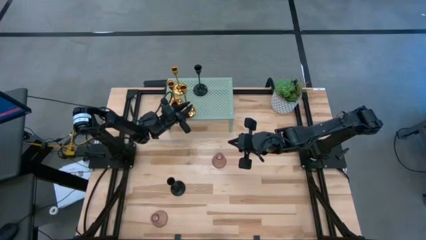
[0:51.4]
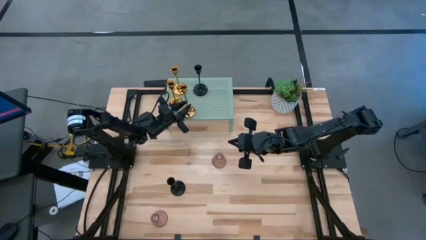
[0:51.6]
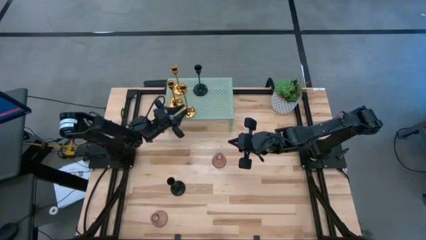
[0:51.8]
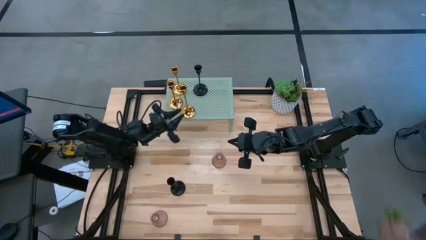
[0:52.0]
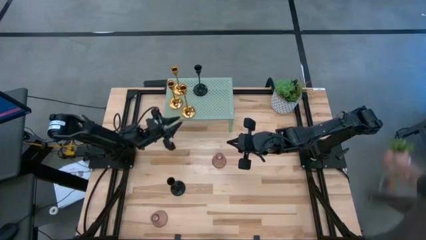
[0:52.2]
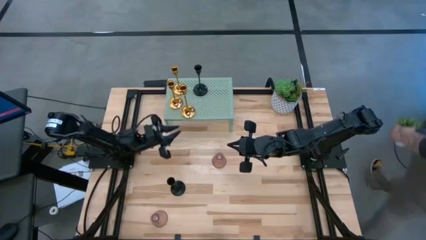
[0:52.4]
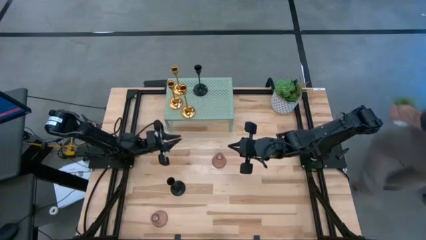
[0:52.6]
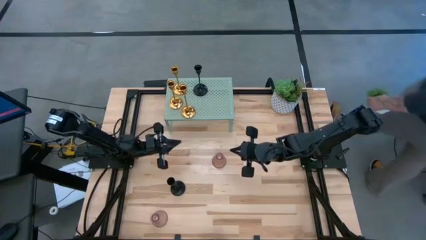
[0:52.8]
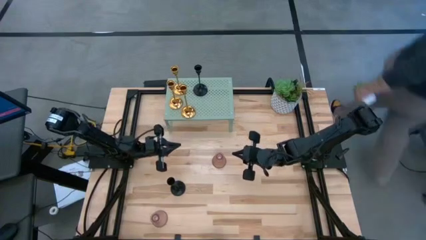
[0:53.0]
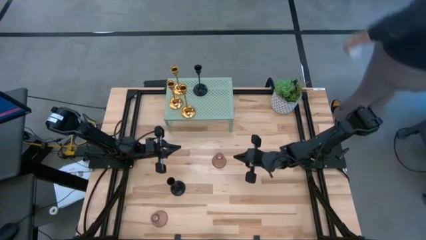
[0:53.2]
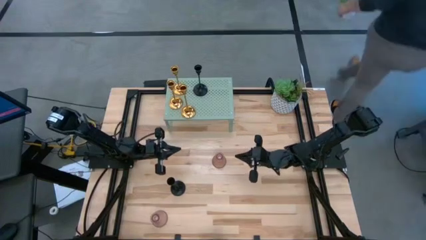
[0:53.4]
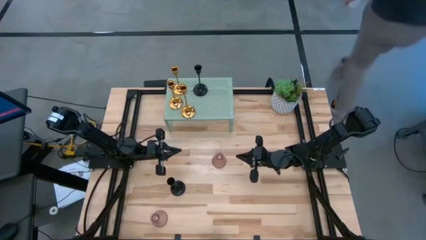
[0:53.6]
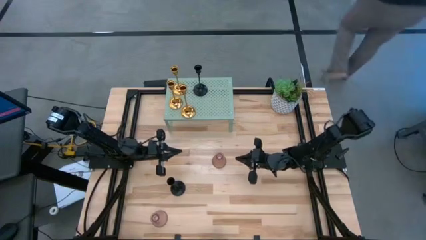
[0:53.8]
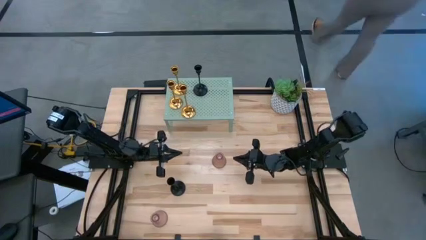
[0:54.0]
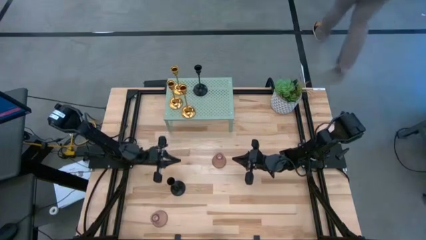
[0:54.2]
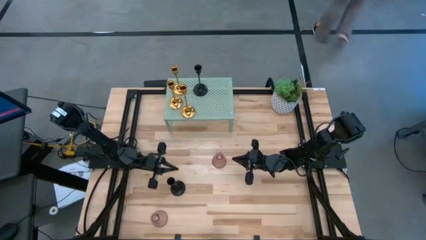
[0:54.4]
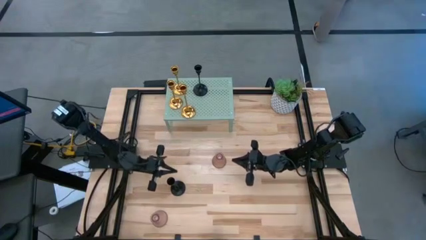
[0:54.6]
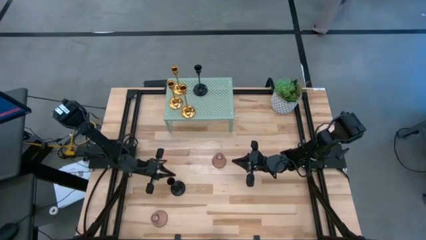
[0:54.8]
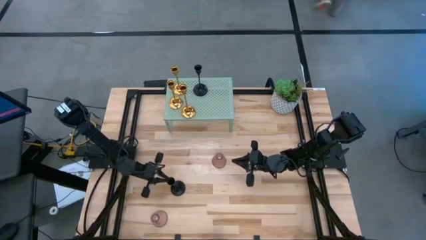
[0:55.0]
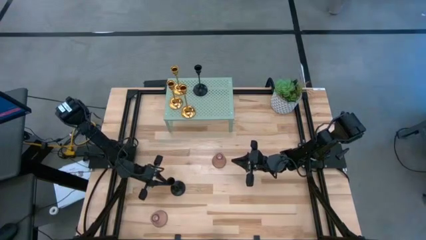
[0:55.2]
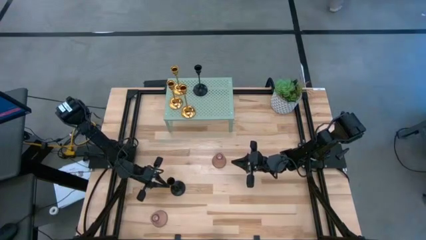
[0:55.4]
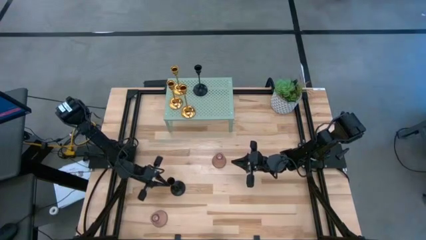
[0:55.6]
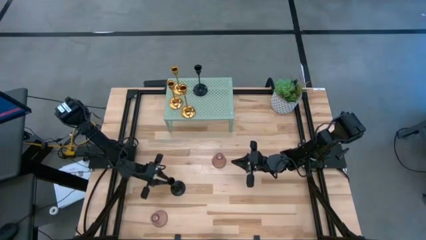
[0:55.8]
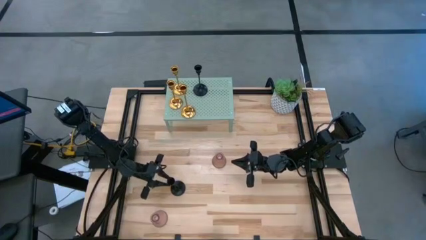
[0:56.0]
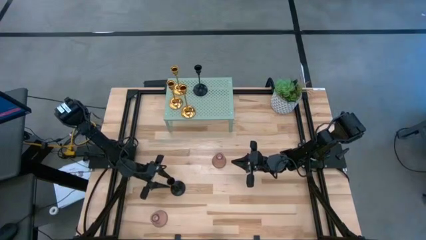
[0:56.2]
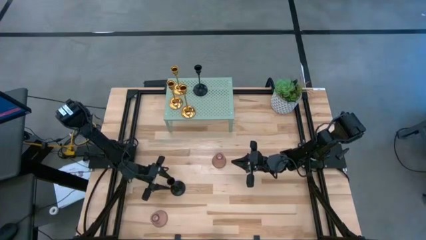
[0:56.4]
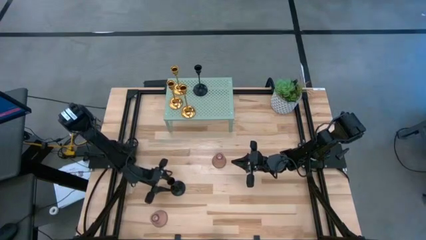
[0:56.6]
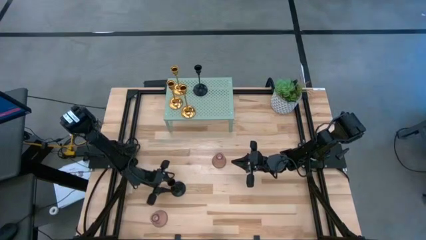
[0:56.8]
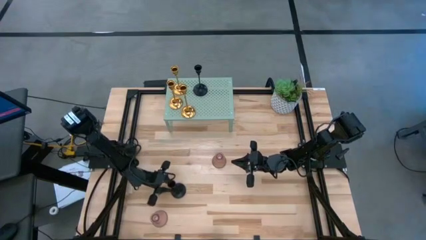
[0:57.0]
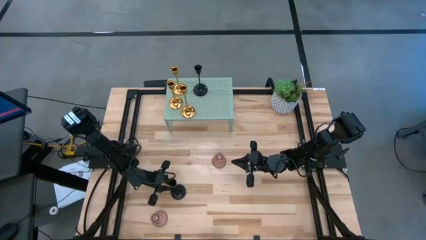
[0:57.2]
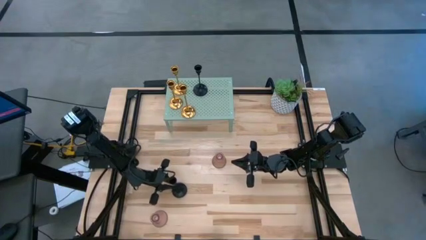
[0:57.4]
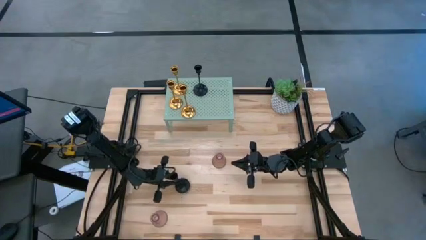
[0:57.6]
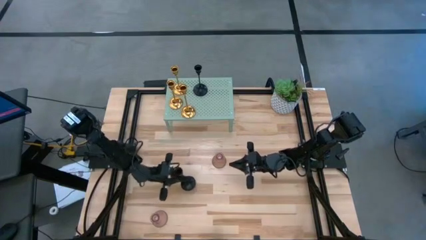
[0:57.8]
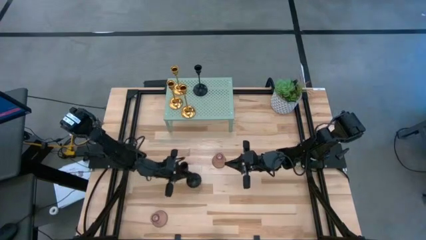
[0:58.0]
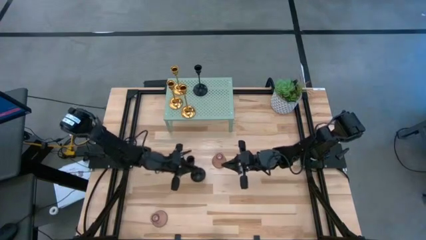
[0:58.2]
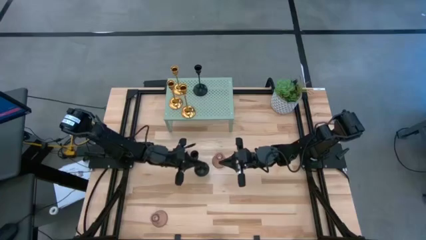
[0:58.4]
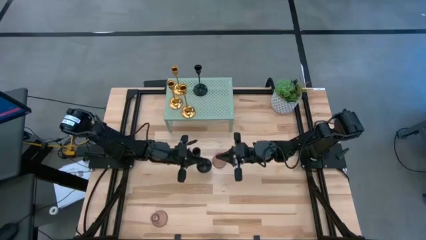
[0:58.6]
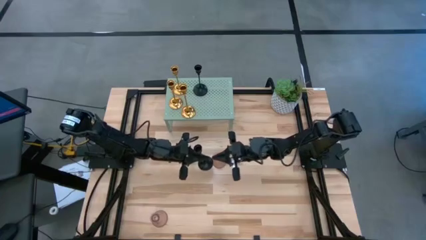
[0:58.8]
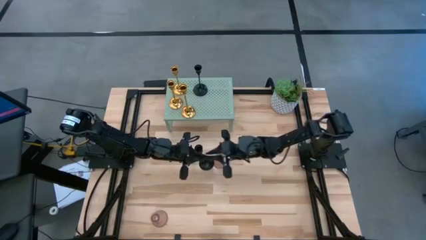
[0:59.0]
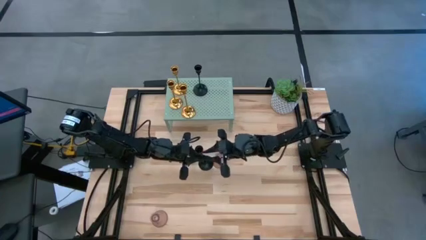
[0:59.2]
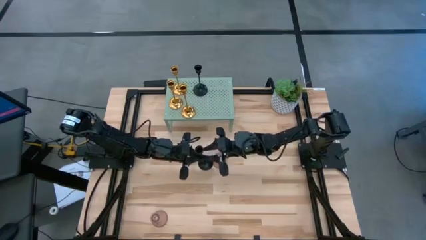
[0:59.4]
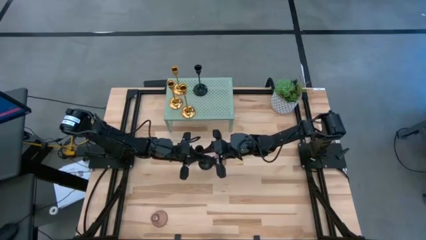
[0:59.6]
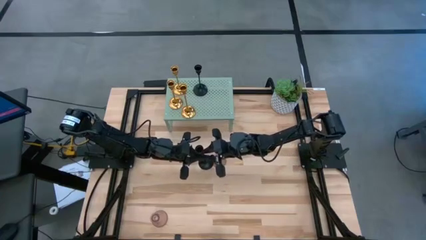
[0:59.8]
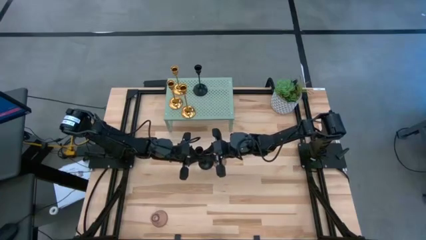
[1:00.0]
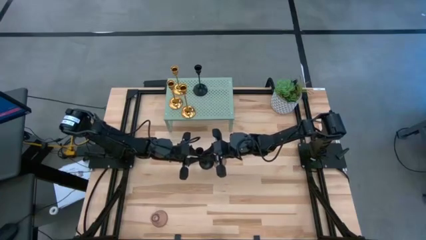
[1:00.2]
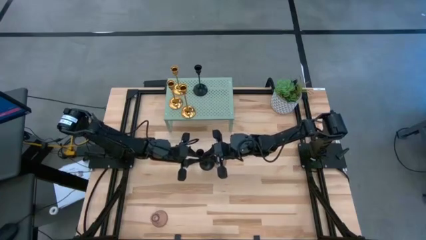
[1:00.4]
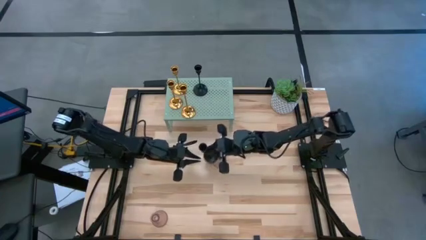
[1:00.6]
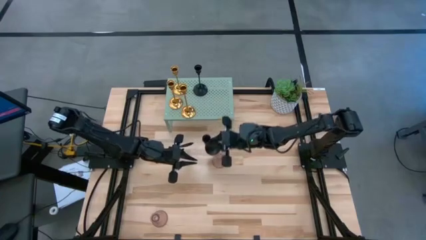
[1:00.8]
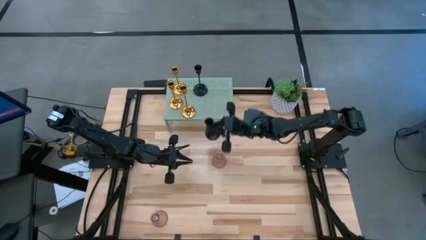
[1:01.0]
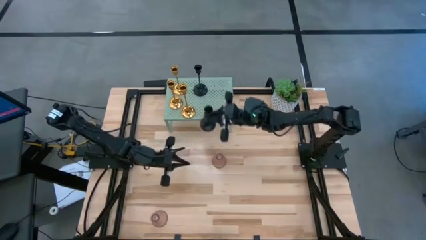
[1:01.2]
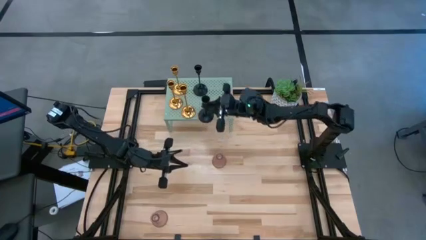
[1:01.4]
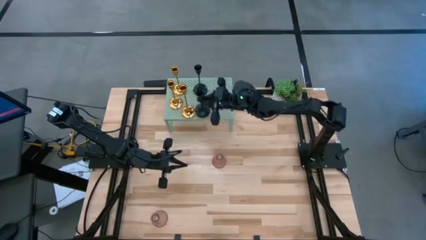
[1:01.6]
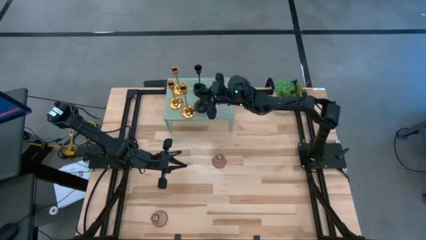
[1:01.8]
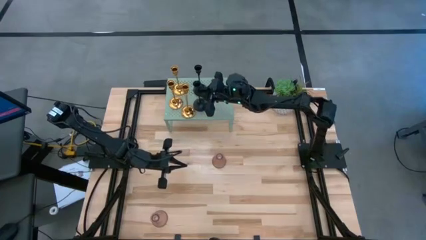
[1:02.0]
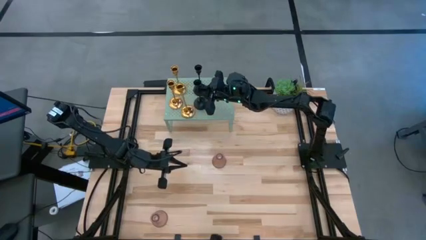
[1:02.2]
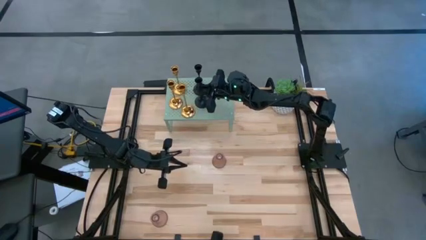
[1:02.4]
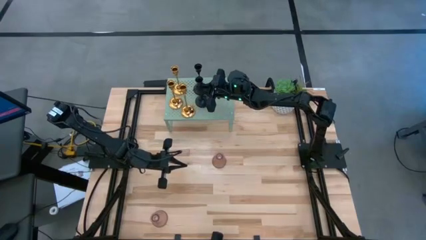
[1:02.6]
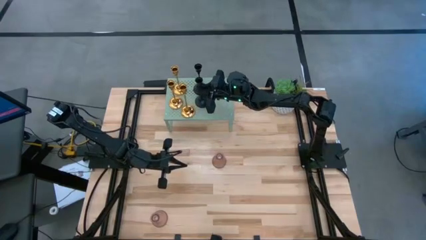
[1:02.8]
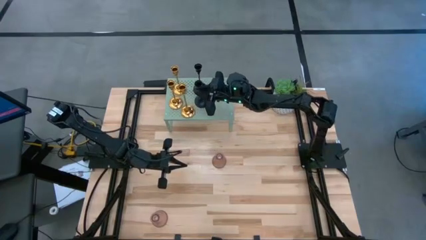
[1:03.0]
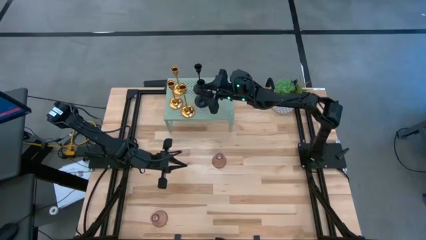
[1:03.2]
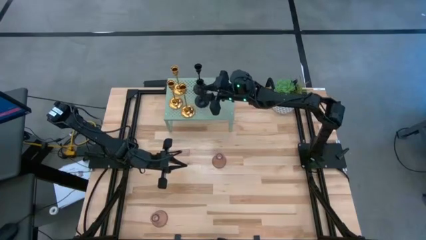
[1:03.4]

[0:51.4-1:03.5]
Task: Pick & Place candle stick holders
Put the black candle holder on the shelf aligned with the other black candle holder
